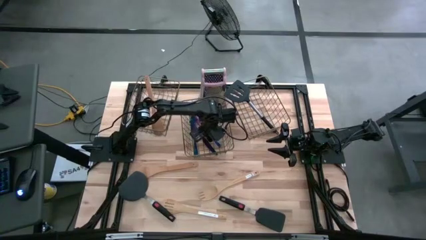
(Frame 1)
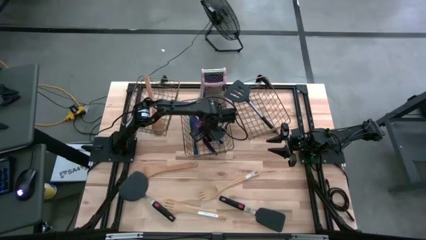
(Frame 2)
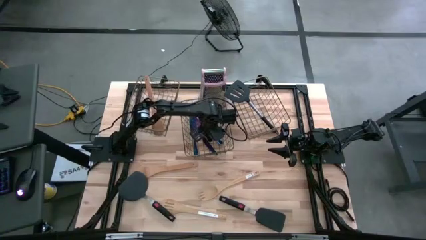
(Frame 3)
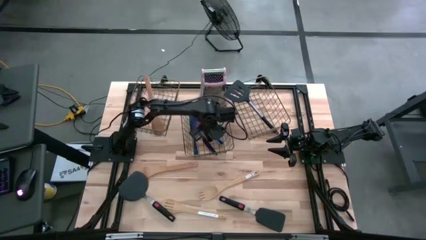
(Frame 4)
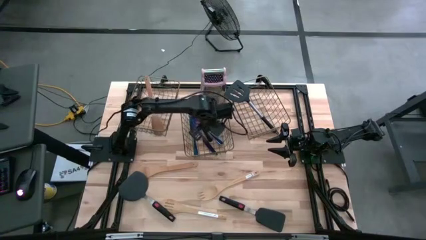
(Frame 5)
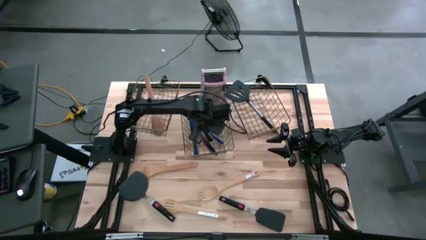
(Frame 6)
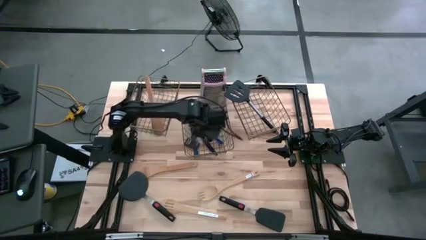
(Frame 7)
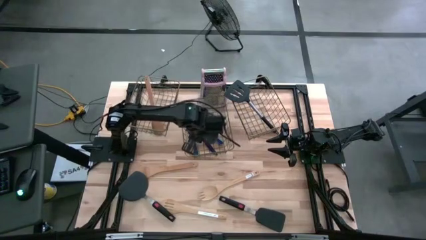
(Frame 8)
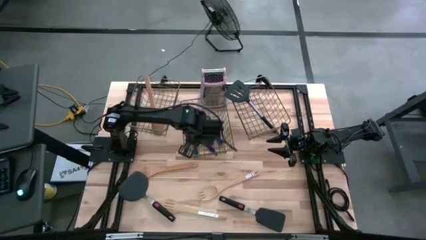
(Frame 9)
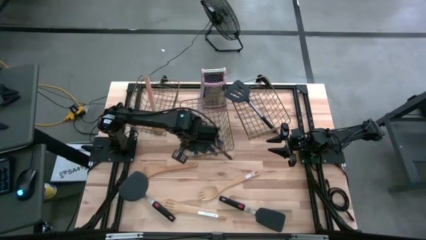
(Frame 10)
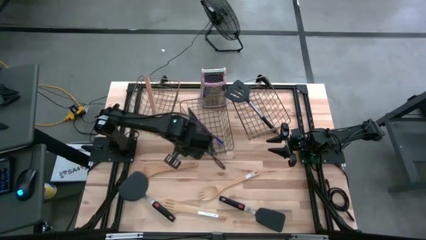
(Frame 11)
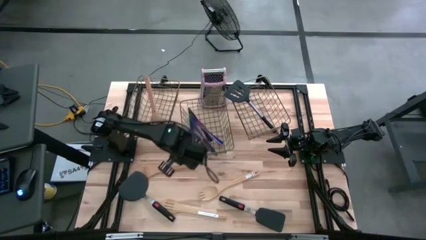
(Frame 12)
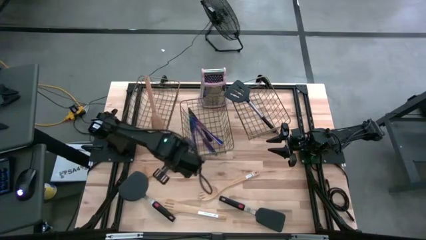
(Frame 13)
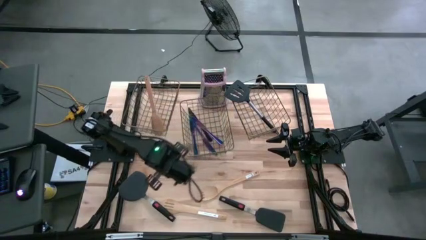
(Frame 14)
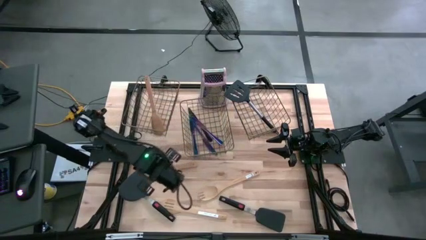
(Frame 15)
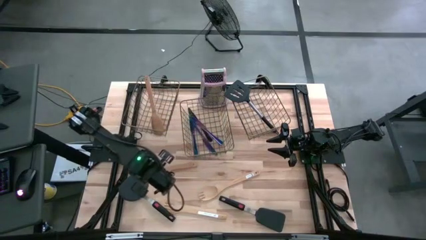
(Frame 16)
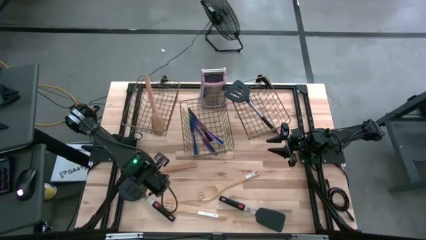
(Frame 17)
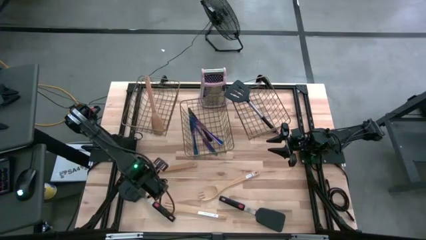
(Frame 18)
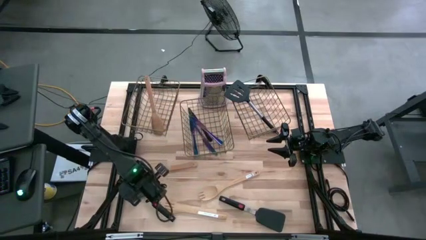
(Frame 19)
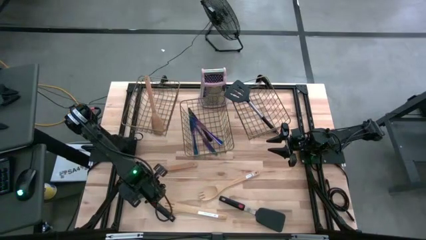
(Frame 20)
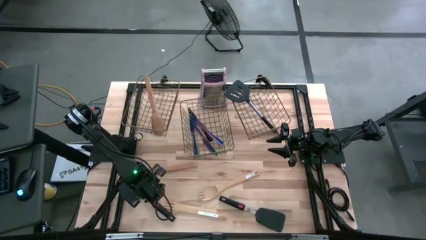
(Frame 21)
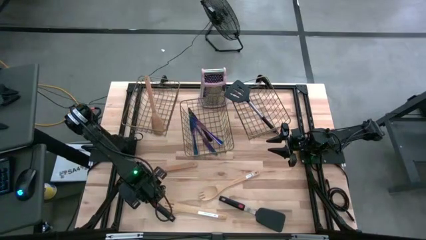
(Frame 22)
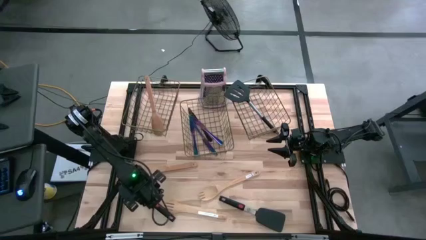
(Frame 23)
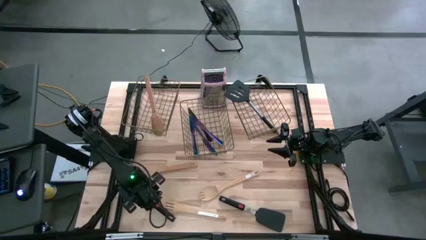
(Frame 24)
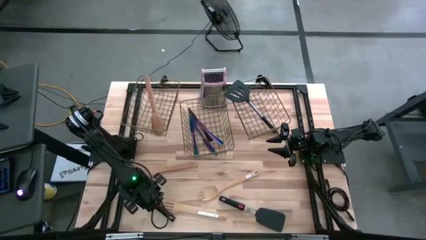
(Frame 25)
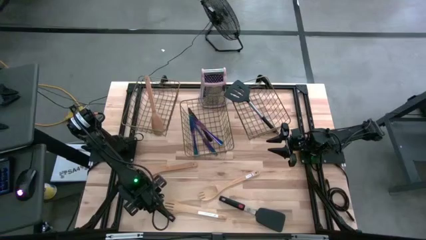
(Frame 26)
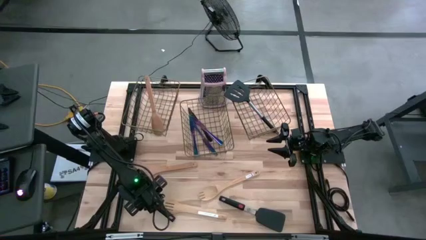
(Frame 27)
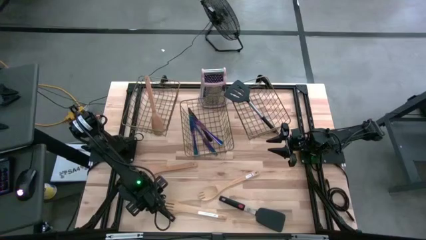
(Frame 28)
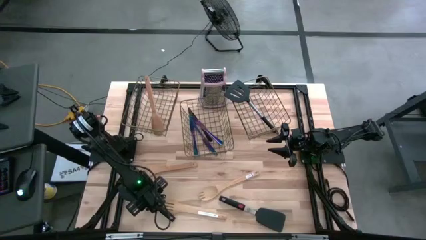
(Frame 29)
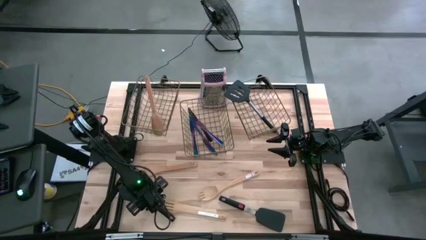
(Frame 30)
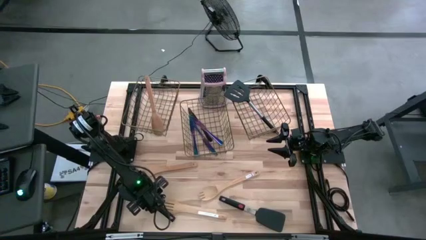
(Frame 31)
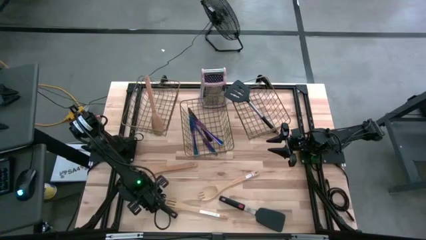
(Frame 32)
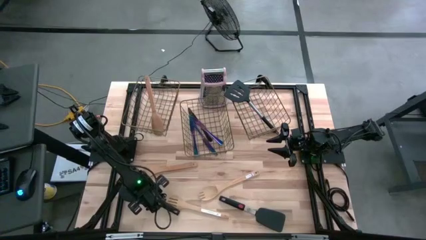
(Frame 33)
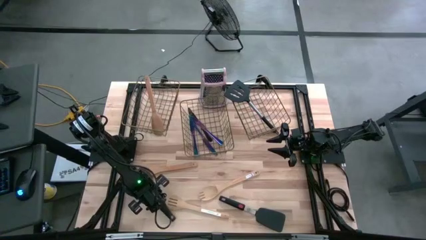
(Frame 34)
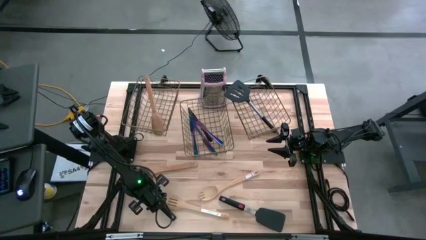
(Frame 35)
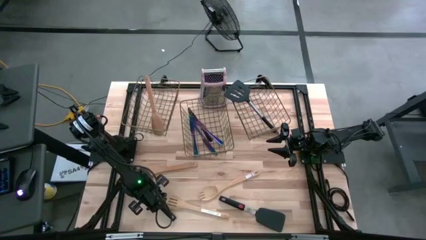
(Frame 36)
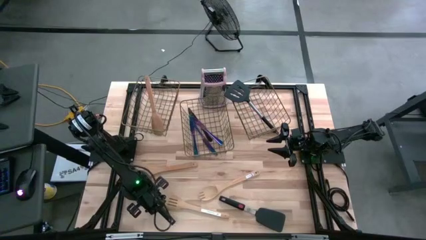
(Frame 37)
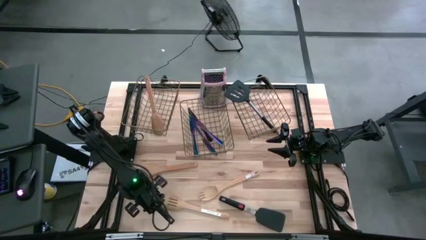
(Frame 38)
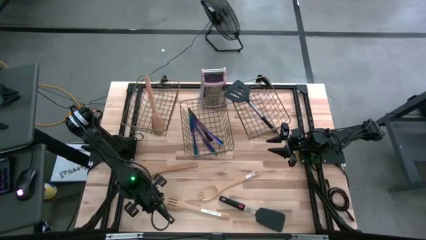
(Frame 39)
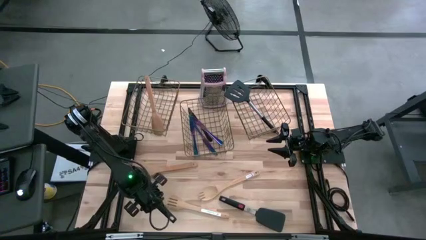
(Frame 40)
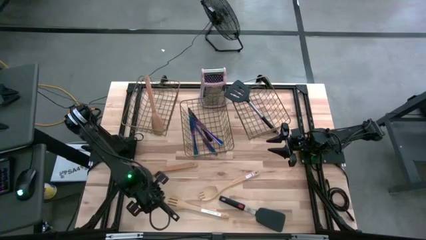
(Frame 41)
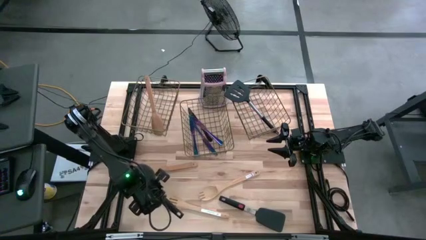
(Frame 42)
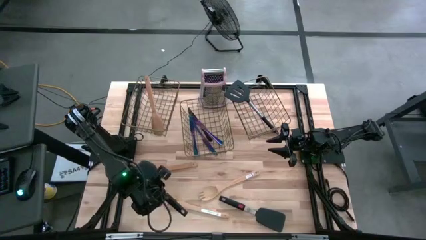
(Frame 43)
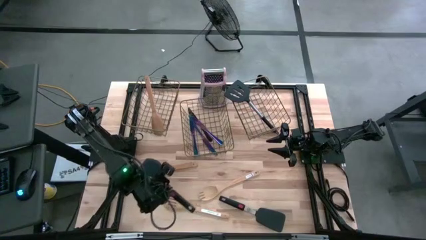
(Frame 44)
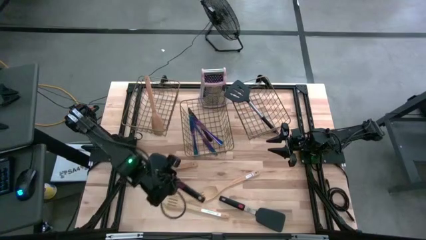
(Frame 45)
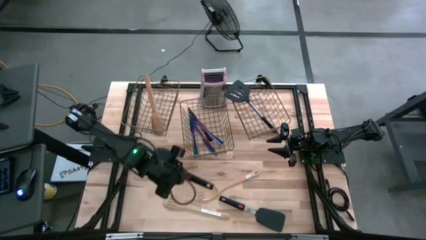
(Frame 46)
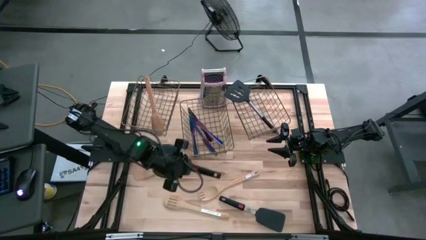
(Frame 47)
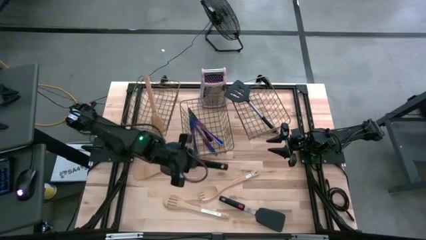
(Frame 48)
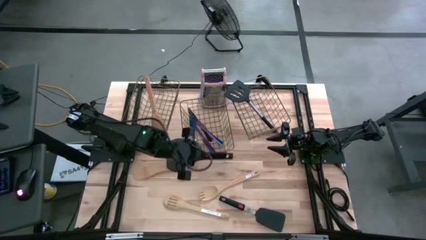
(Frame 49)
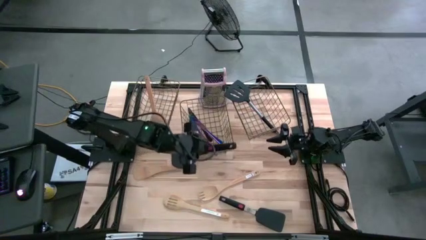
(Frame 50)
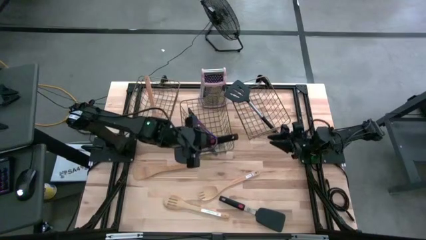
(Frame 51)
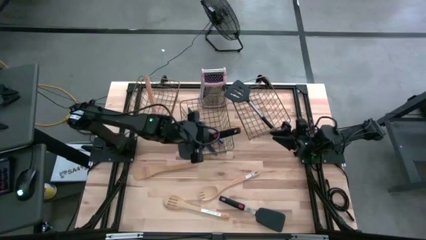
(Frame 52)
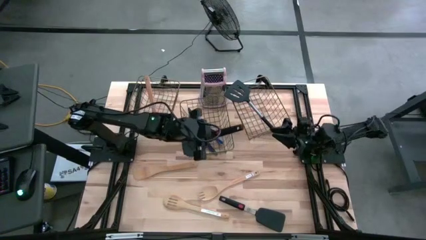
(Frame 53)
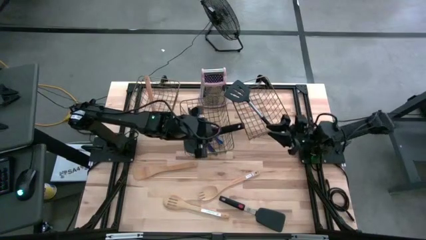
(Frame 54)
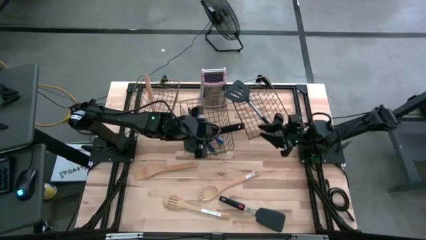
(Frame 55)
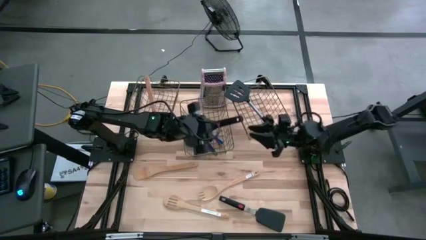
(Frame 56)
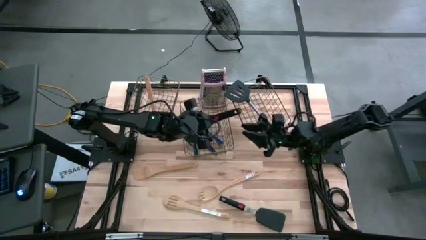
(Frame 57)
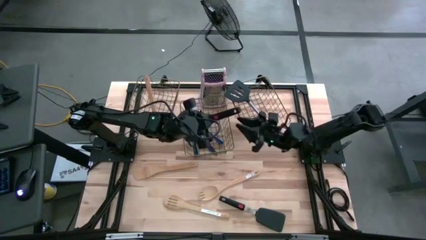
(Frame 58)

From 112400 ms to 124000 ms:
Task: Pick & Place Kitchen Items
Put the left black spatula into the right wire basket

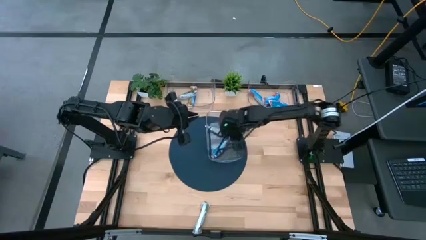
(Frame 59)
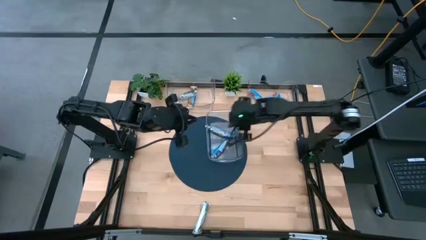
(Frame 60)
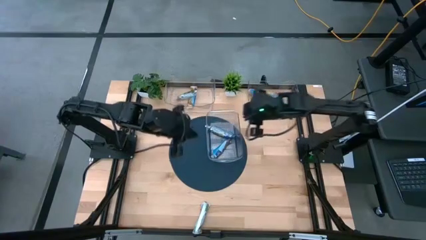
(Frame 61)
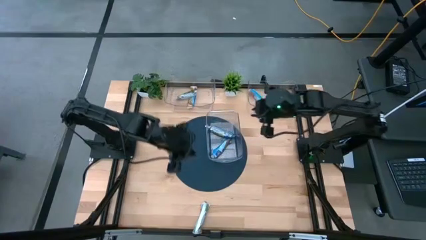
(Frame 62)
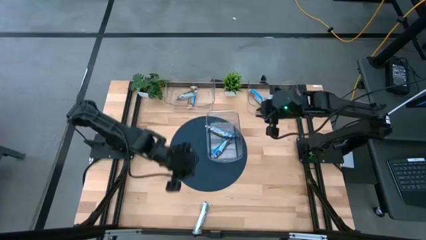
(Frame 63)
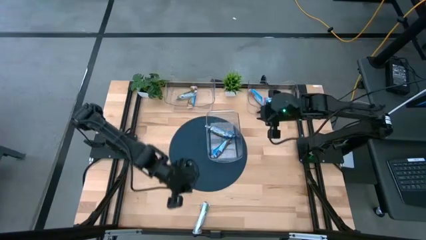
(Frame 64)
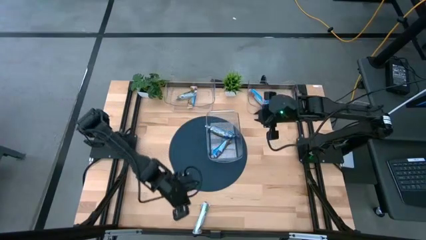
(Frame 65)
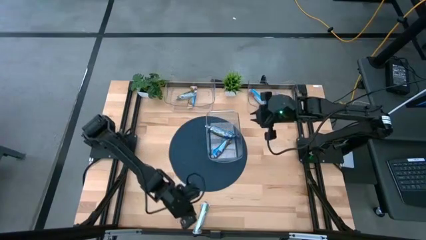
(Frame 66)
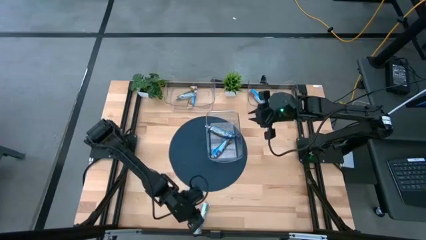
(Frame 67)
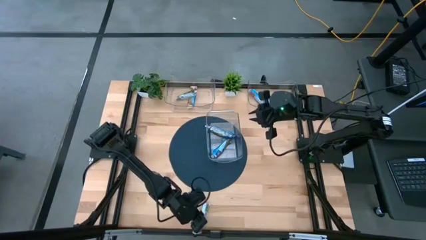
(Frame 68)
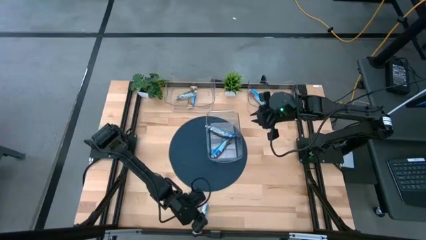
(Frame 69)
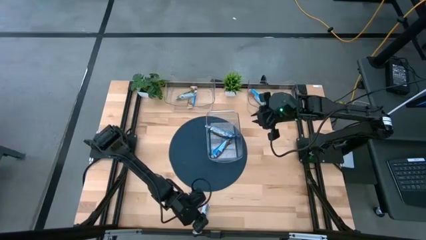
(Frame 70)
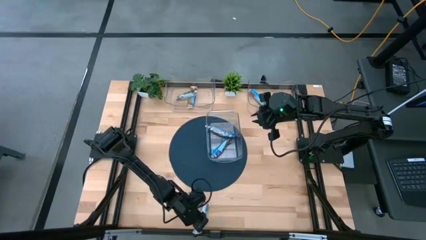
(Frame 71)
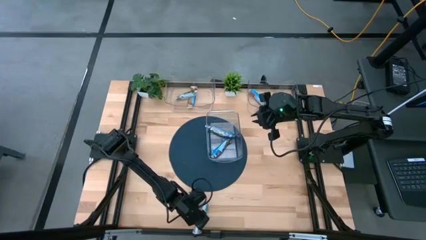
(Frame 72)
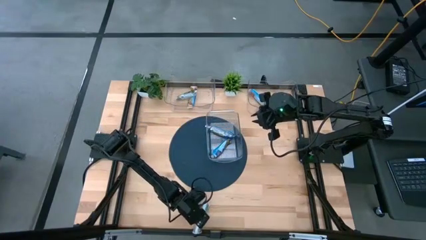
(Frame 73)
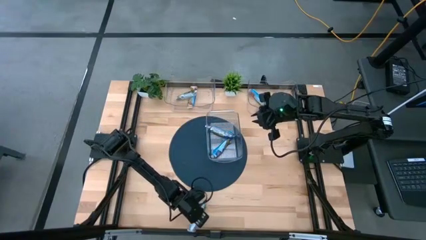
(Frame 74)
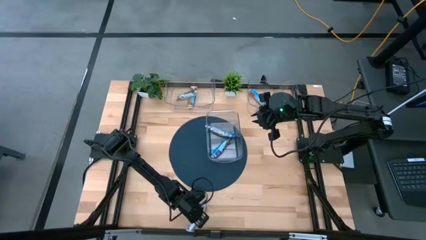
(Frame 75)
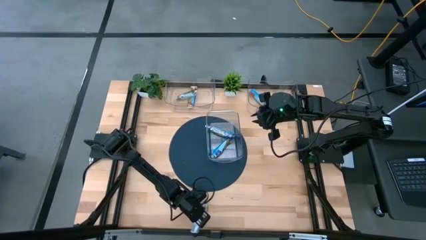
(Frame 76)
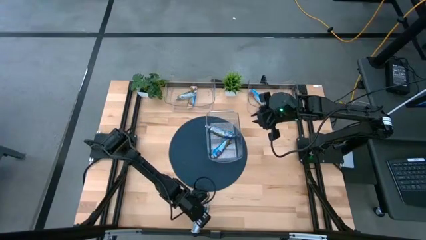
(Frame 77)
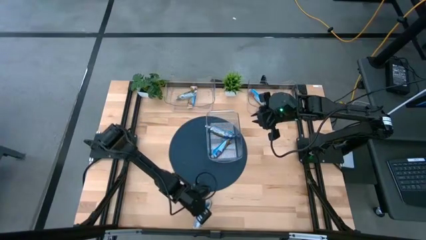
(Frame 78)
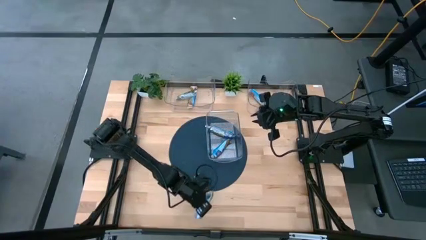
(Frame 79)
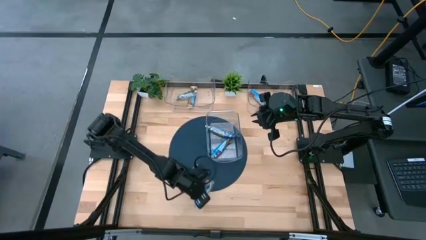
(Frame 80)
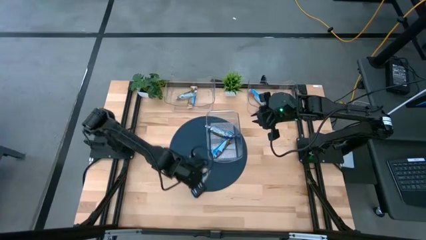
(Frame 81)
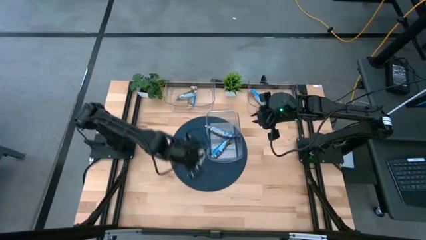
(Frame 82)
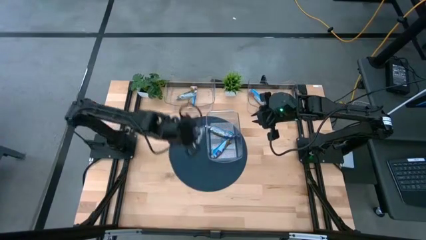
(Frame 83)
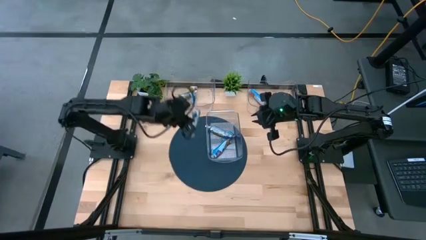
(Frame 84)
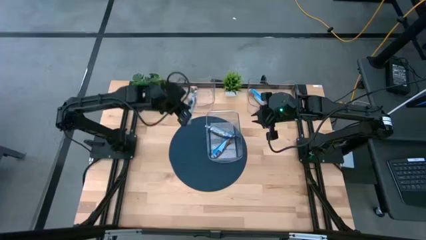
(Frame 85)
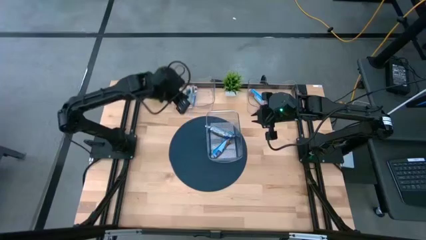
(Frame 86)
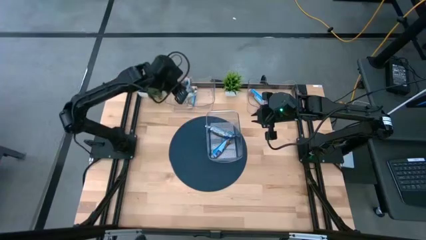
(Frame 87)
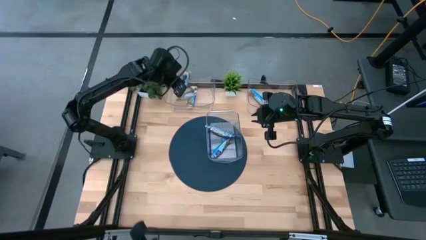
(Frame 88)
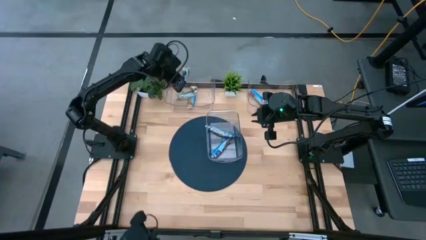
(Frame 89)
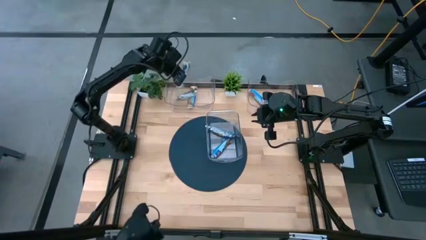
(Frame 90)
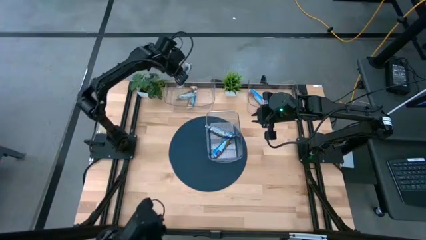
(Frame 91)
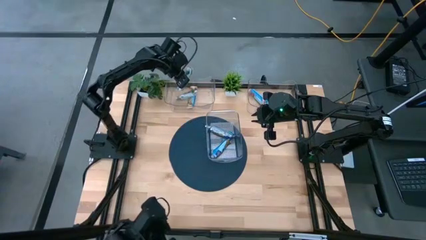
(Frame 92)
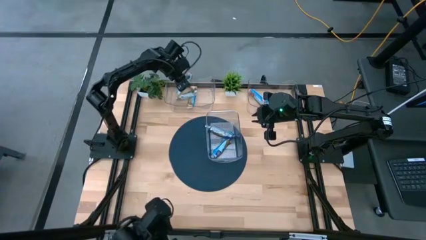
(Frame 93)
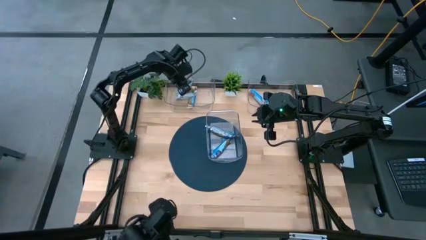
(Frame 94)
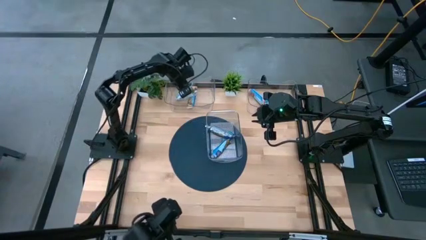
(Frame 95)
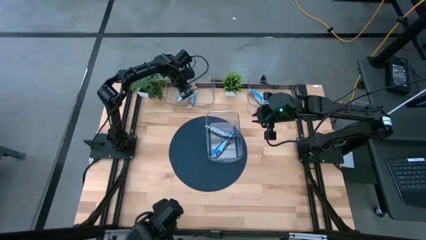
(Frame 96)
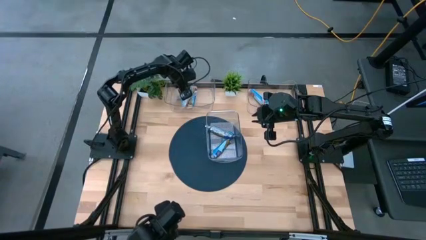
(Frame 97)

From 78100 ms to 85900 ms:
Task: Pick and place Granola Bars by type
Put the yellow granola bar into the top left transparent bin
